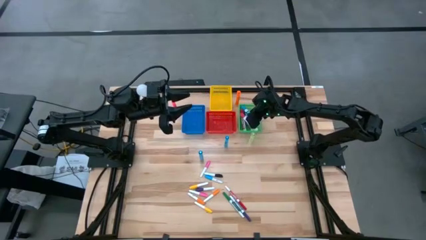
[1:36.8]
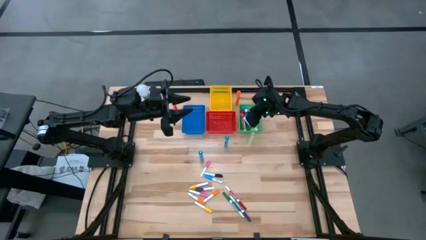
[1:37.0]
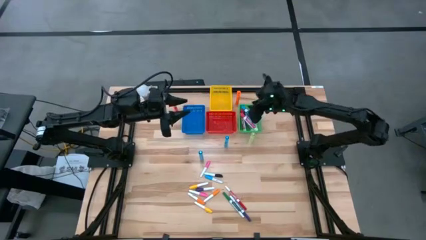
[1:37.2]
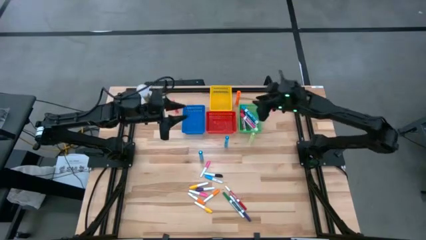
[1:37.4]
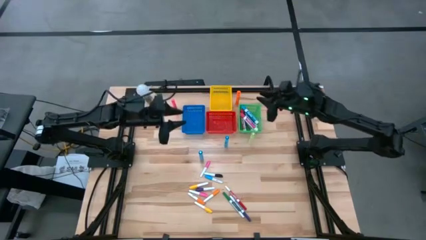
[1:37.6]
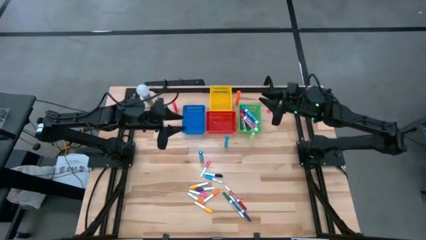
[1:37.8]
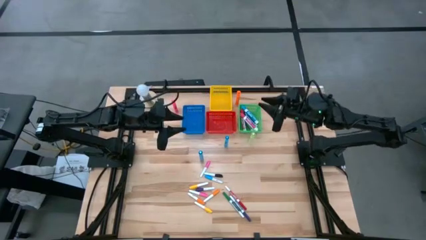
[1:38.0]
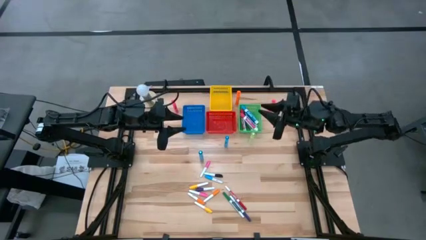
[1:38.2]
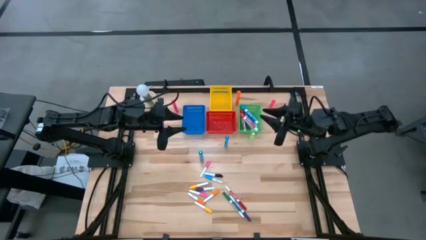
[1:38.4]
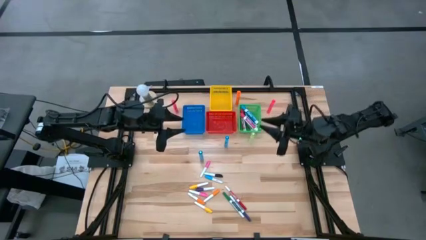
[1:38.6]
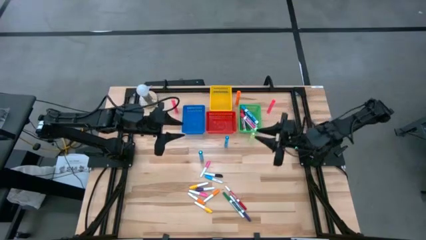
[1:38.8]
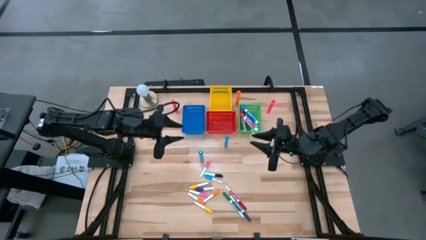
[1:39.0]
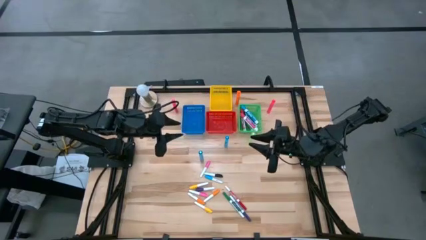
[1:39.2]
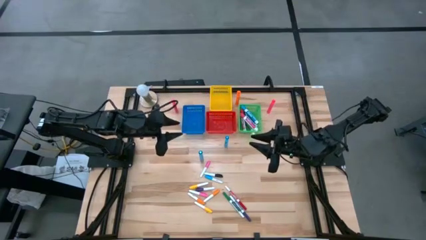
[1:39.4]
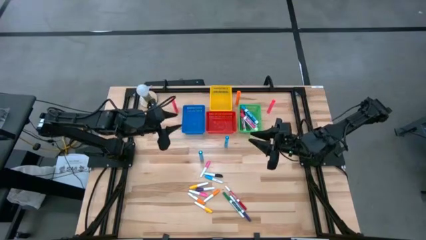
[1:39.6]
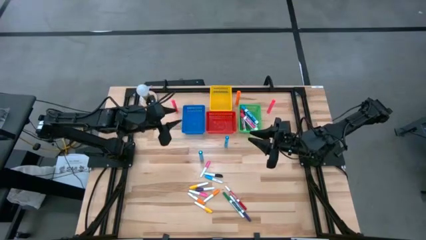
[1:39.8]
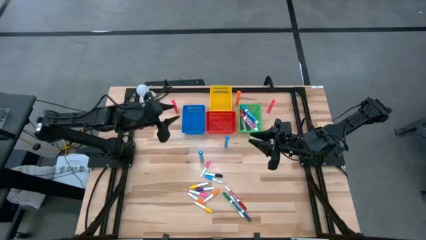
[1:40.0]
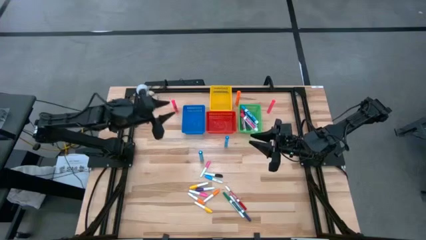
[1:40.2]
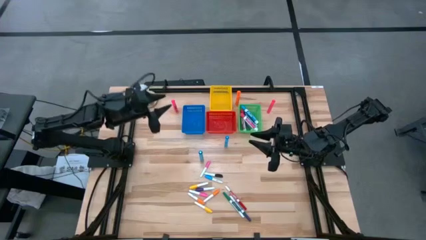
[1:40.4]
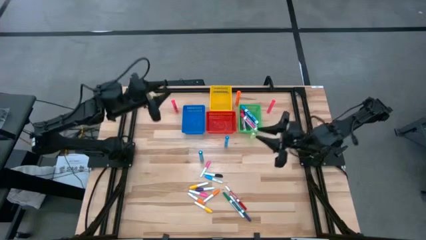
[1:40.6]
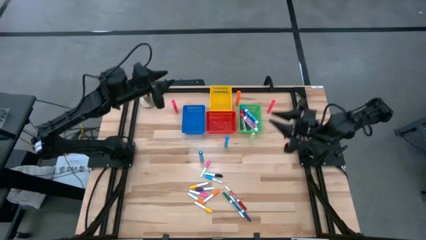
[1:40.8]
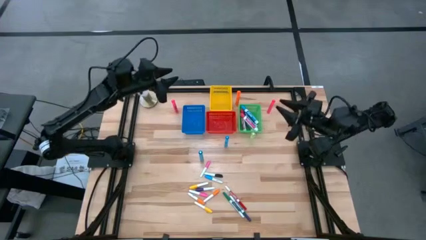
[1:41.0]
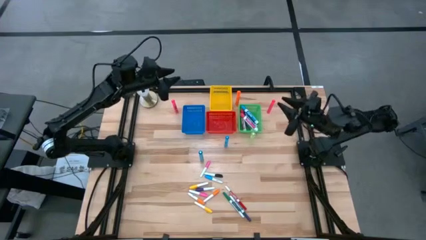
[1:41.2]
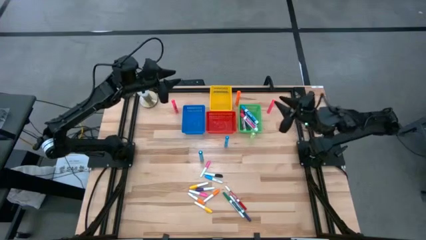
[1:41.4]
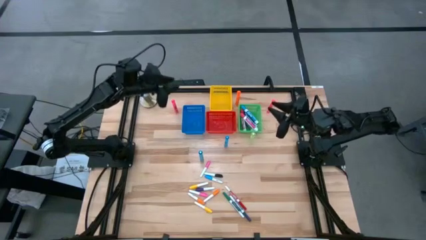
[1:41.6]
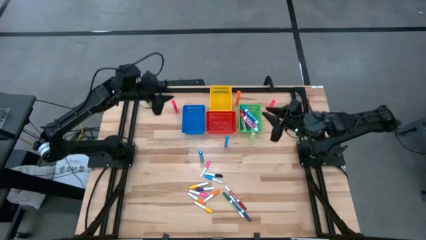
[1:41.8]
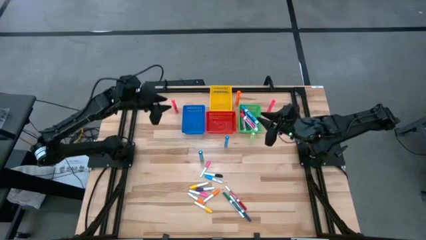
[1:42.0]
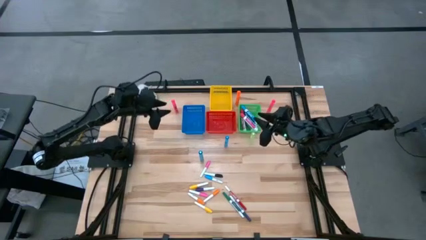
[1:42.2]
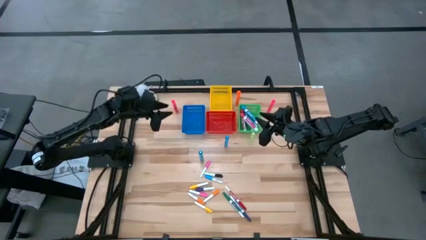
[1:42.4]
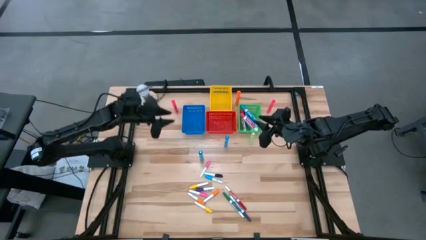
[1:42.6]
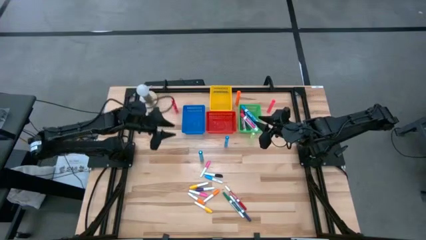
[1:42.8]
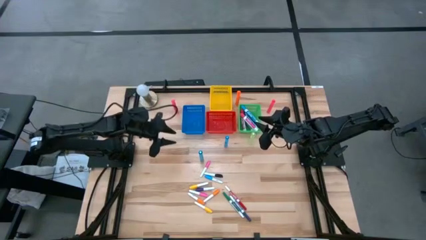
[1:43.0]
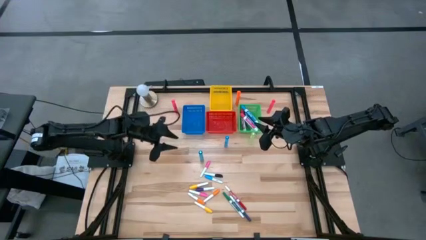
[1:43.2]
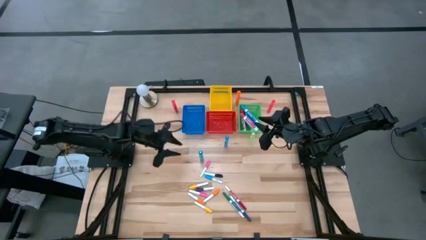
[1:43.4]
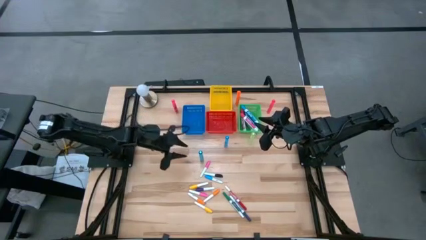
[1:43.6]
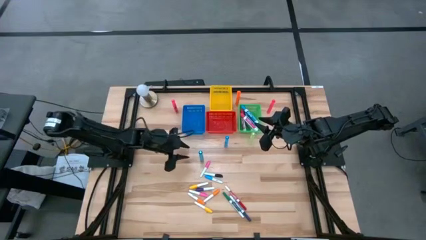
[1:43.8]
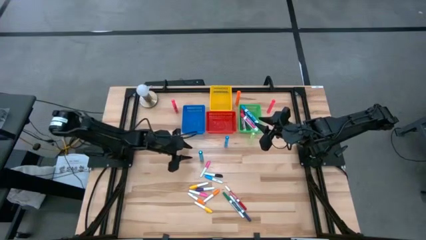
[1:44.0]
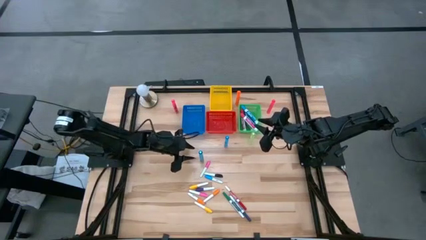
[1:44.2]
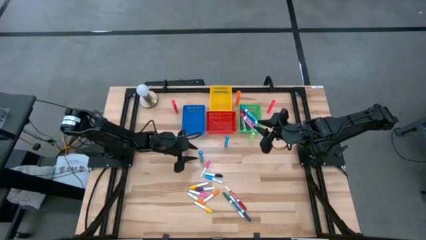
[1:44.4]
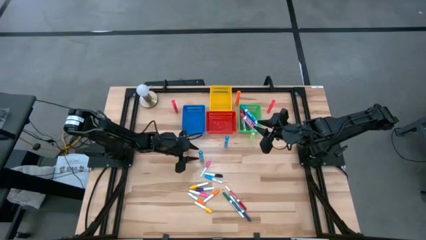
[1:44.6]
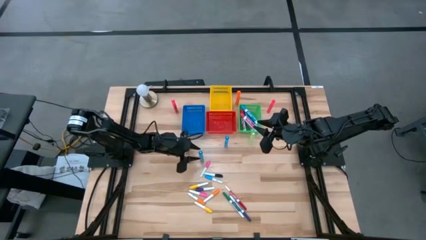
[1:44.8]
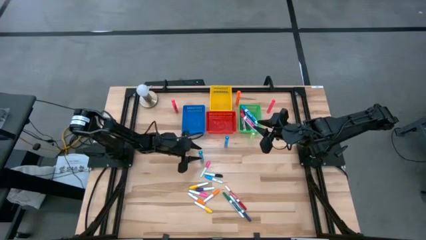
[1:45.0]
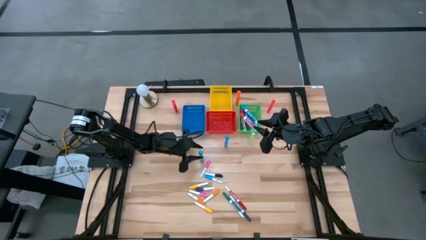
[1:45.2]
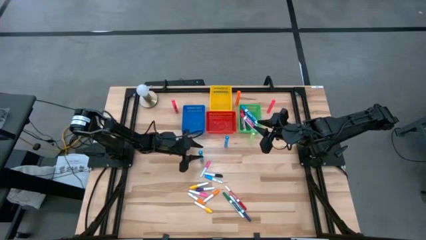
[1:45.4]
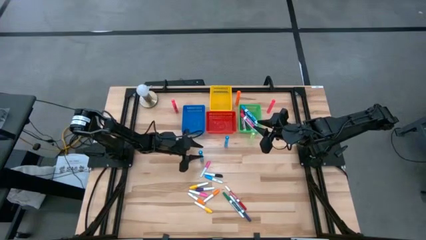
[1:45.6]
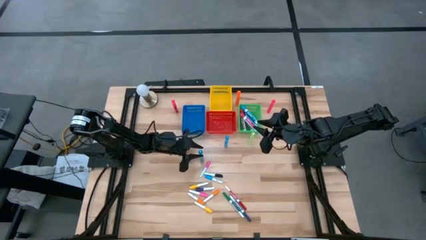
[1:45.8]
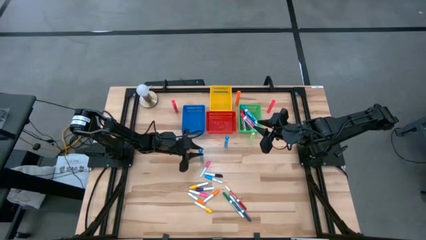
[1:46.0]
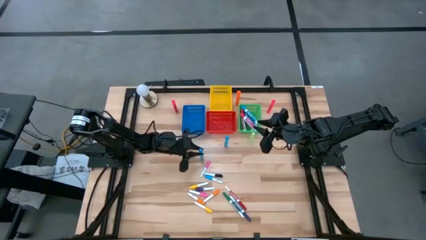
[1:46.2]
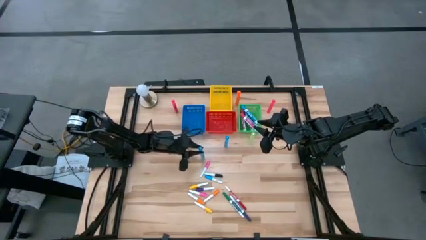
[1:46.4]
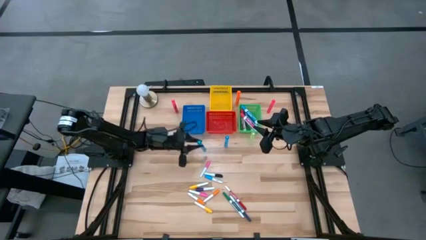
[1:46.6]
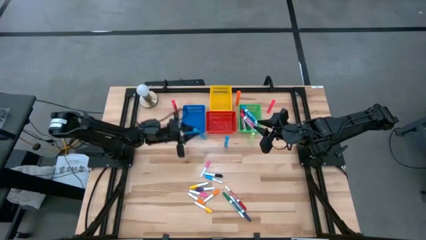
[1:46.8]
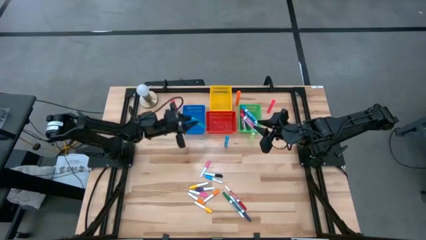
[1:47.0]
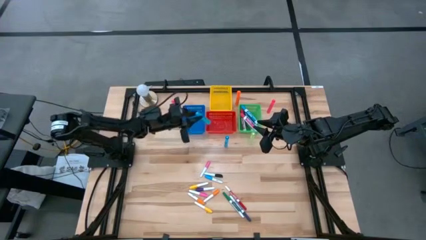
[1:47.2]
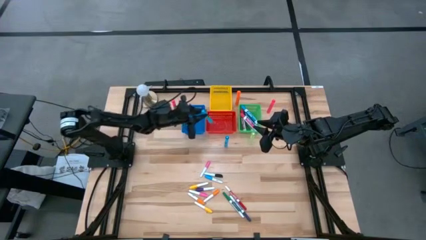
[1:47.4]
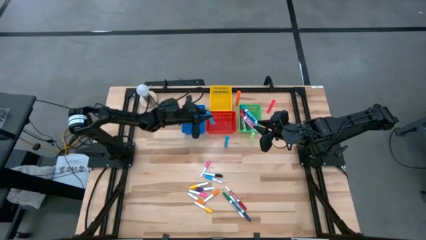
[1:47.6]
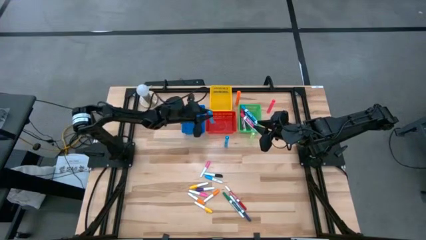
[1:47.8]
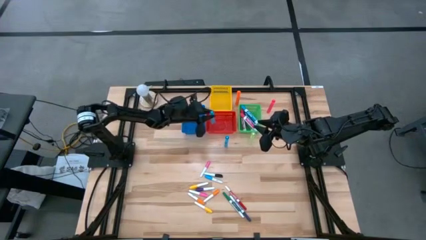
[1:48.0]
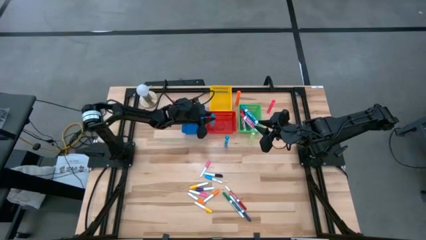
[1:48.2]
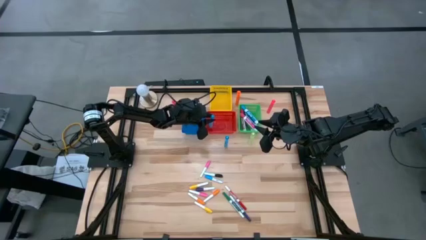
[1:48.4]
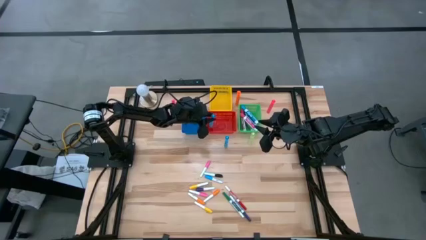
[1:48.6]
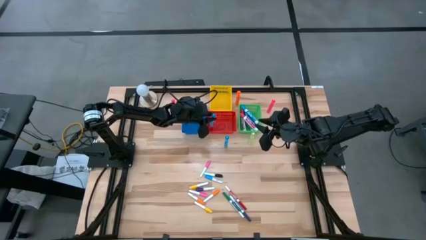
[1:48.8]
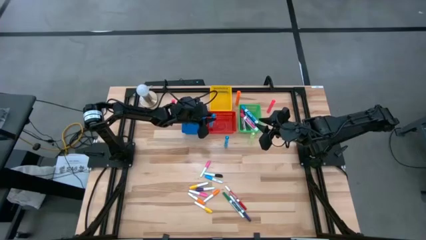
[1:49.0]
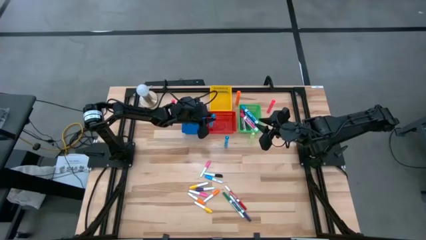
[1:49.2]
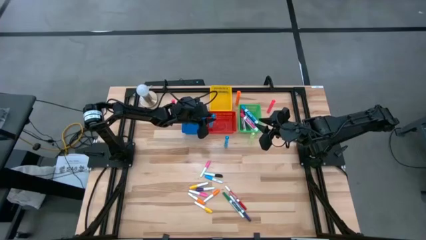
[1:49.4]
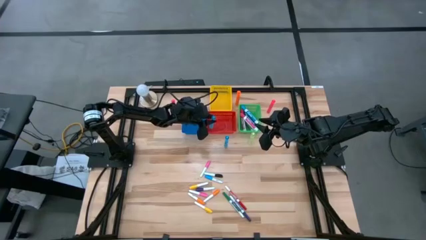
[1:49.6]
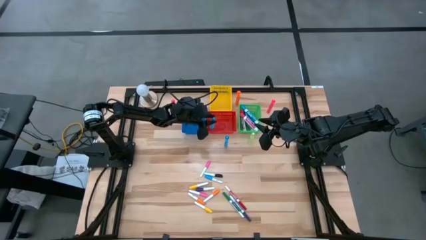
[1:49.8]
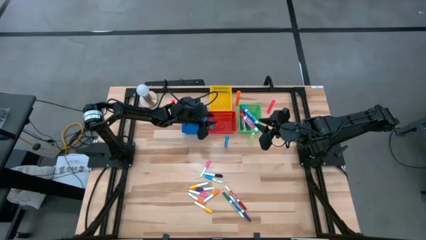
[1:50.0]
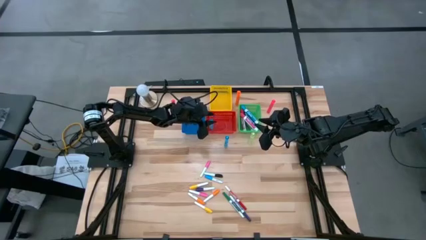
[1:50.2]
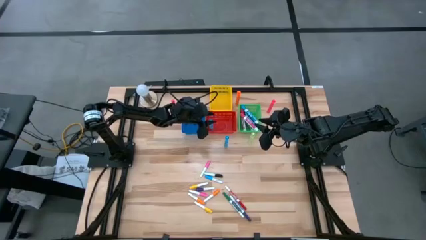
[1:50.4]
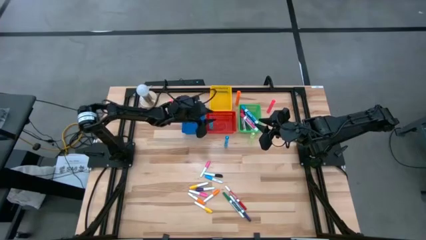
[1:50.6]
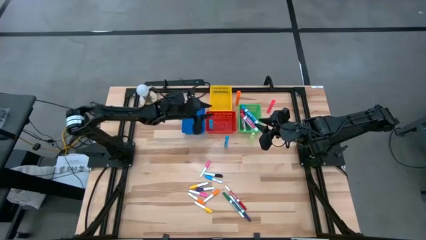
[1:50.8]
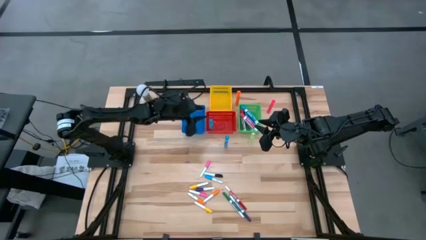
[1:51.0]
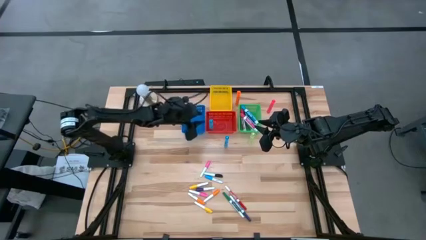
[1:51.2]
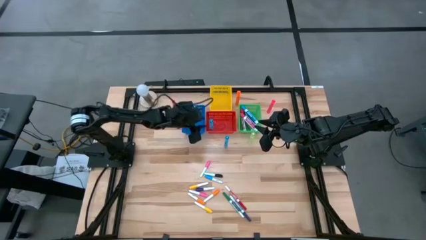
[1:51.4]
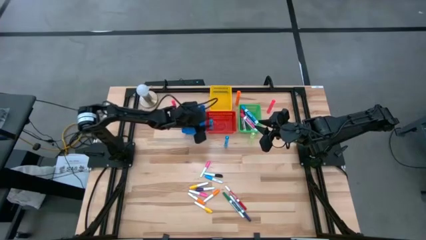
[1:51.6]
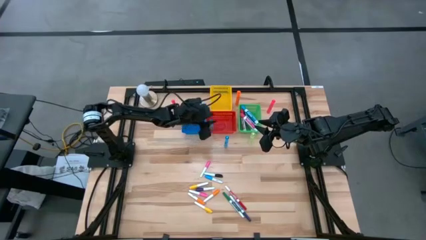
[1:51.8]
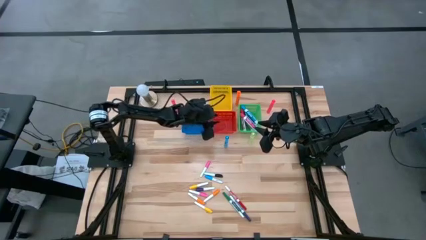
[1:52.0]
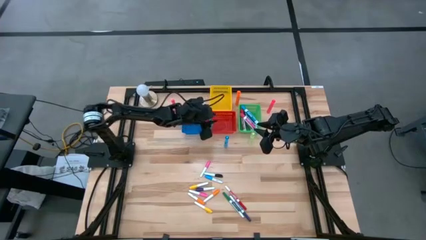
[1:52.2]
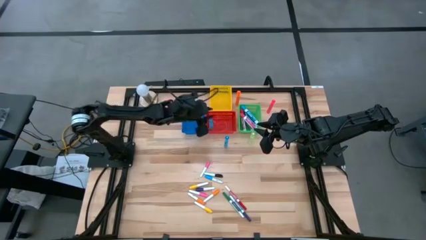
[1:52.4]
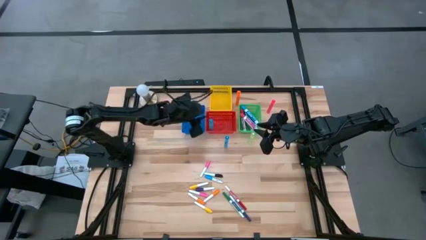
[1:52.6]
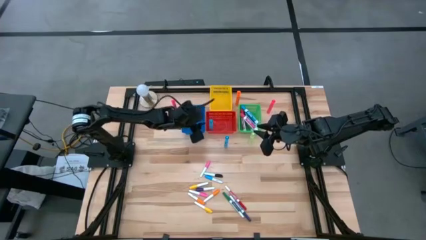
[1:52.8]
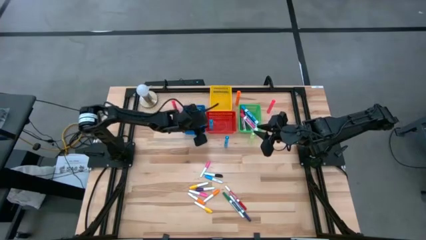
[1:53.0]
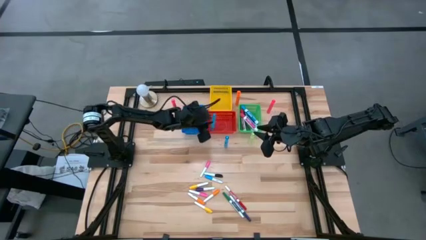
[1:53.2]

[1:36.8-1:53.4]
Task: Pick & Place Markers
Put the left large light blue highlighter pen into the red bin
